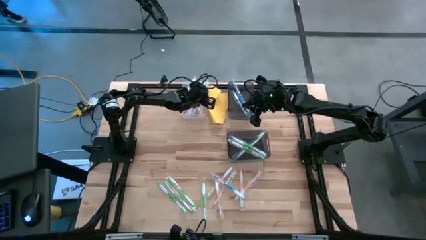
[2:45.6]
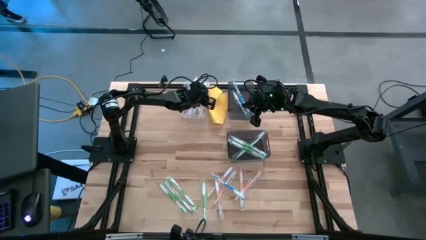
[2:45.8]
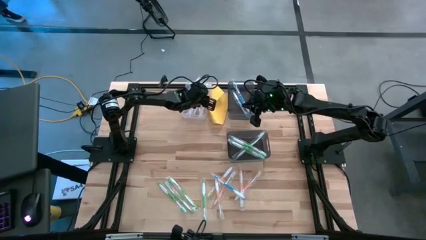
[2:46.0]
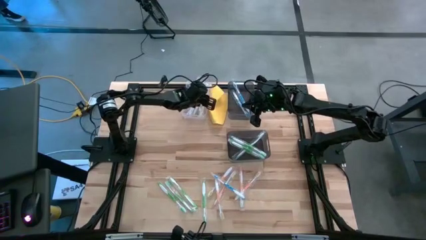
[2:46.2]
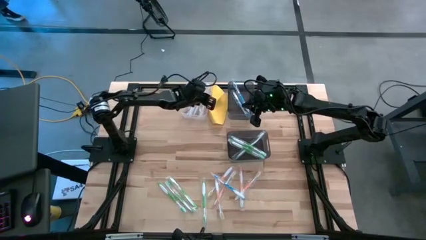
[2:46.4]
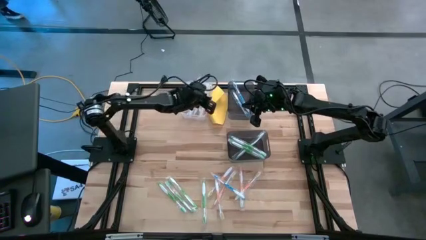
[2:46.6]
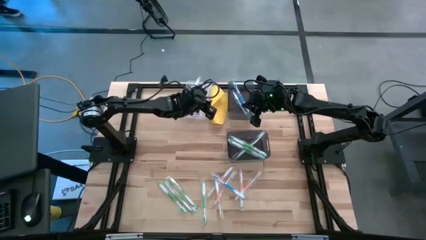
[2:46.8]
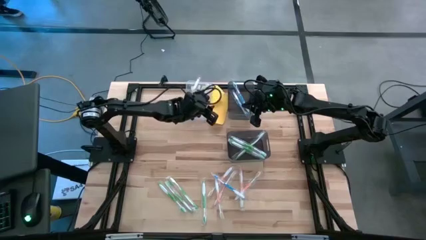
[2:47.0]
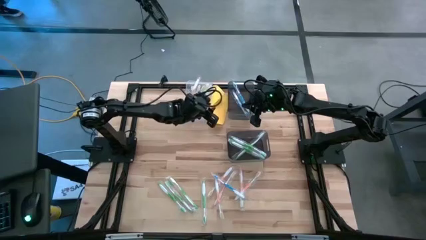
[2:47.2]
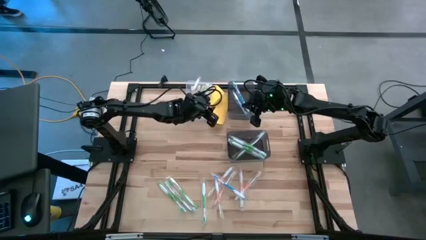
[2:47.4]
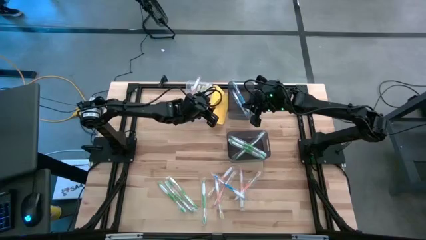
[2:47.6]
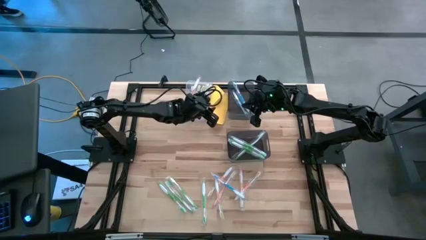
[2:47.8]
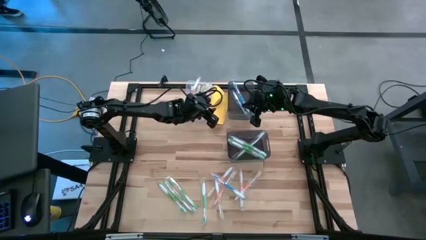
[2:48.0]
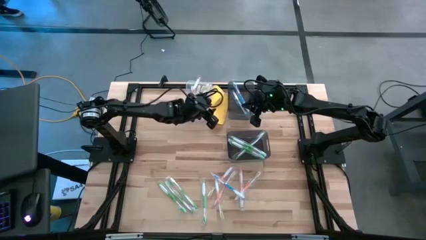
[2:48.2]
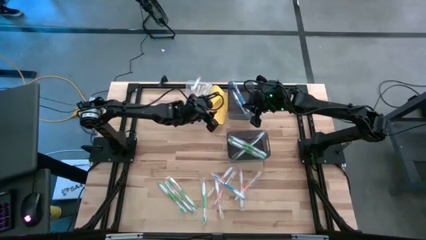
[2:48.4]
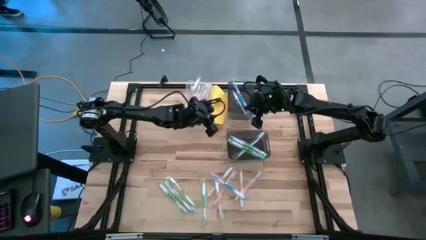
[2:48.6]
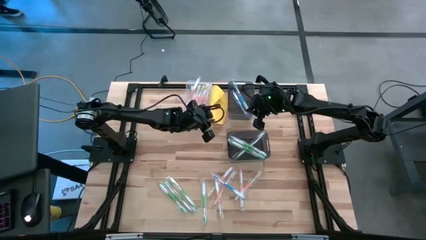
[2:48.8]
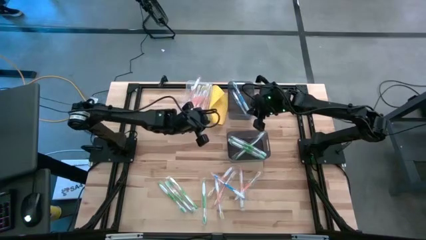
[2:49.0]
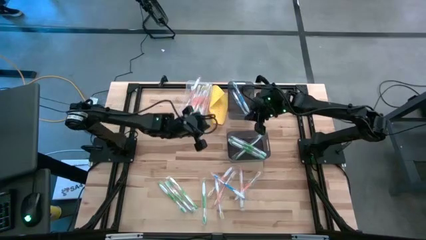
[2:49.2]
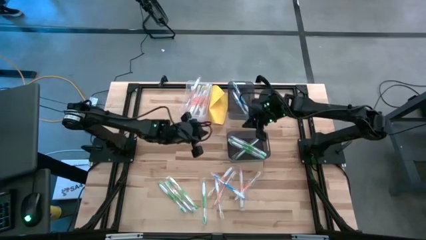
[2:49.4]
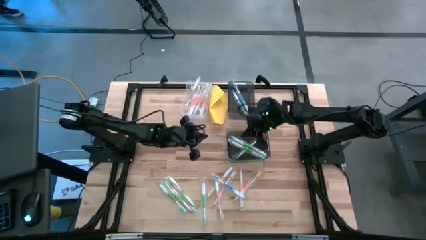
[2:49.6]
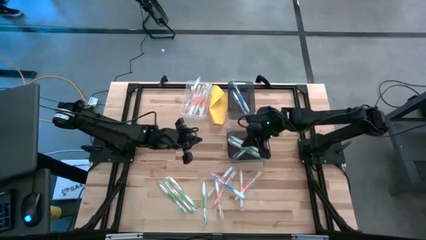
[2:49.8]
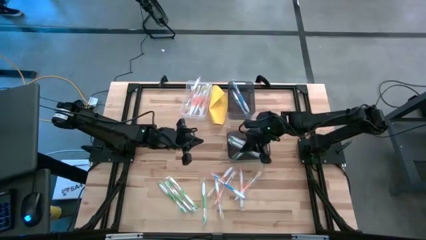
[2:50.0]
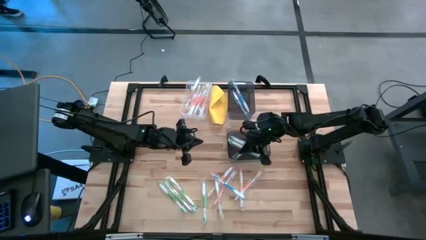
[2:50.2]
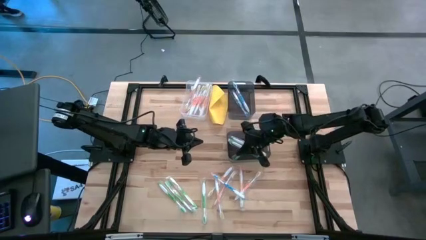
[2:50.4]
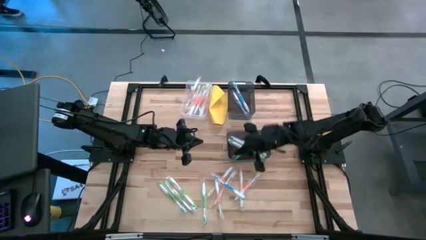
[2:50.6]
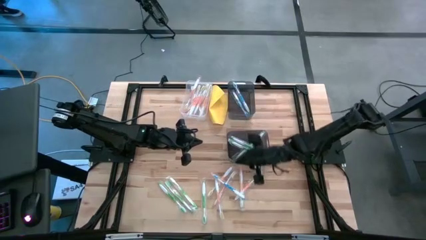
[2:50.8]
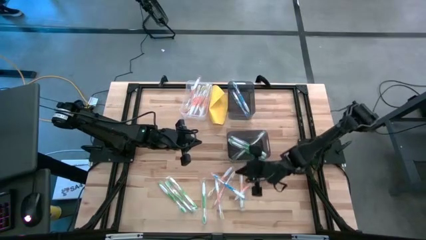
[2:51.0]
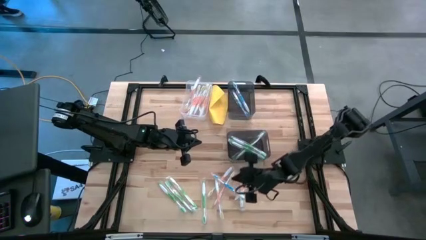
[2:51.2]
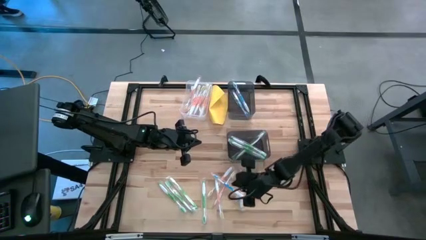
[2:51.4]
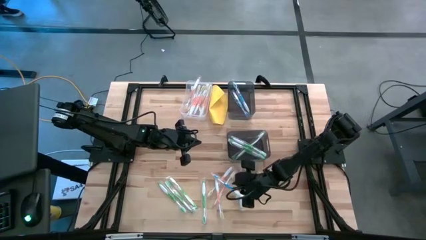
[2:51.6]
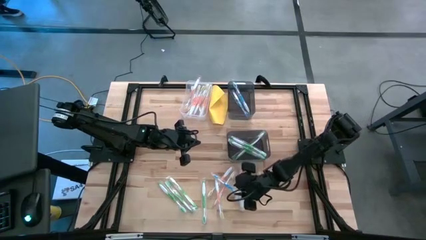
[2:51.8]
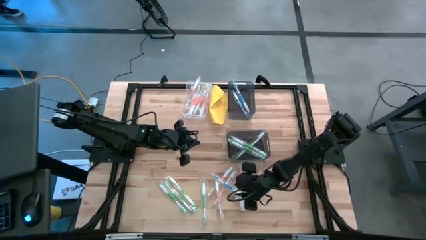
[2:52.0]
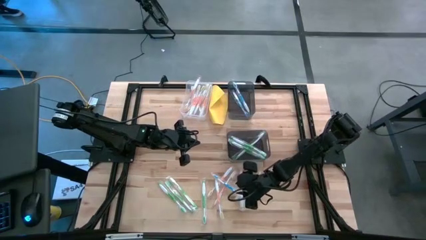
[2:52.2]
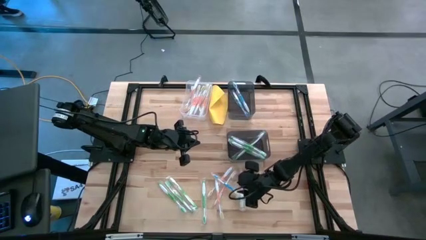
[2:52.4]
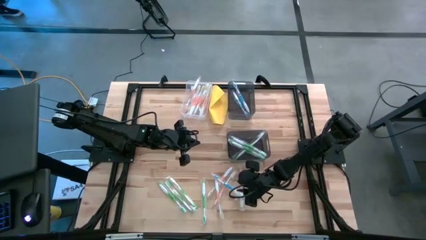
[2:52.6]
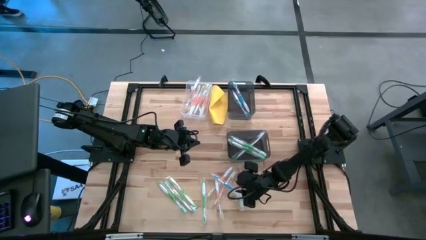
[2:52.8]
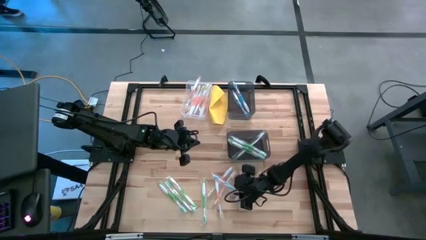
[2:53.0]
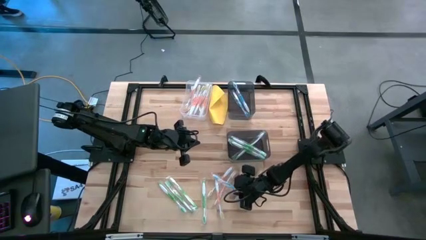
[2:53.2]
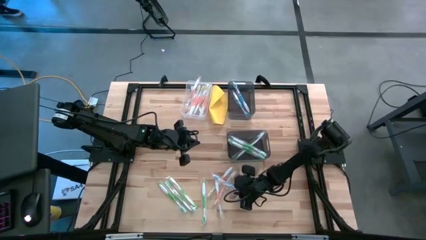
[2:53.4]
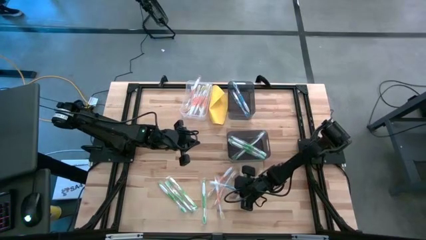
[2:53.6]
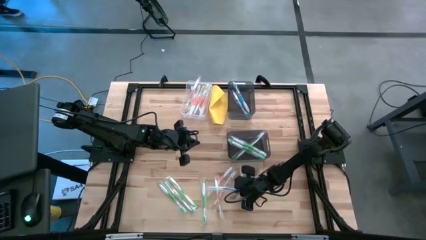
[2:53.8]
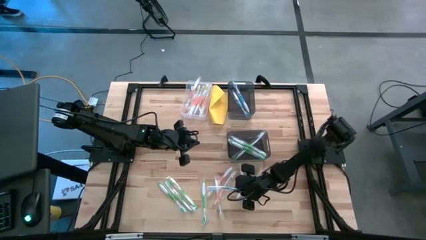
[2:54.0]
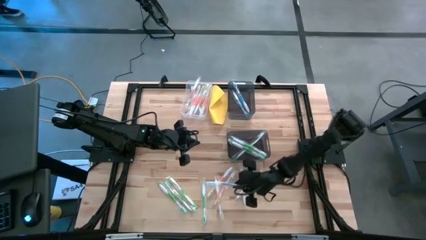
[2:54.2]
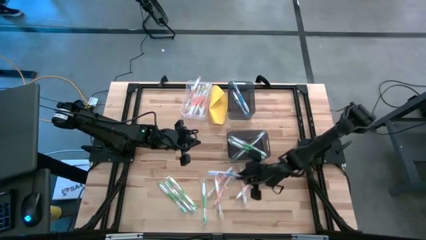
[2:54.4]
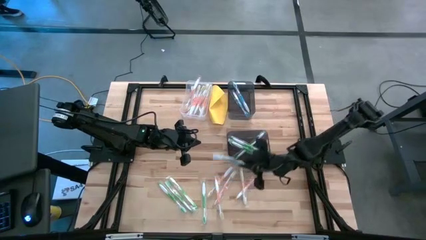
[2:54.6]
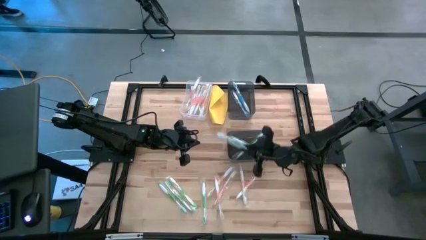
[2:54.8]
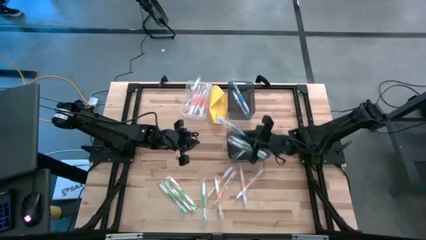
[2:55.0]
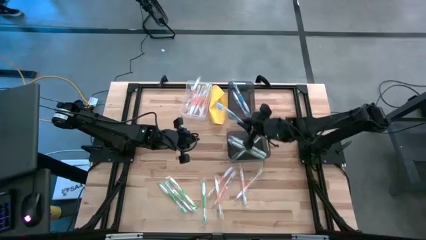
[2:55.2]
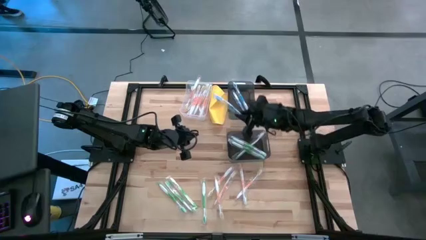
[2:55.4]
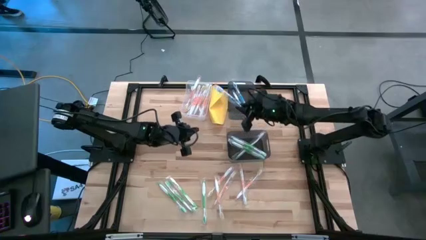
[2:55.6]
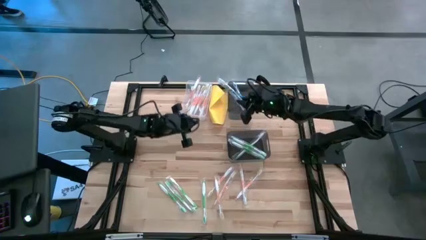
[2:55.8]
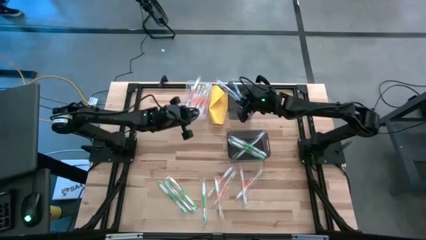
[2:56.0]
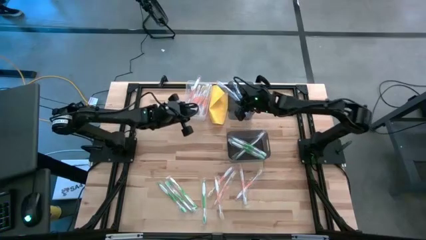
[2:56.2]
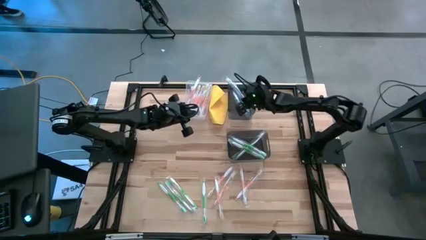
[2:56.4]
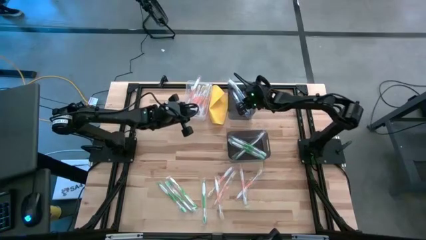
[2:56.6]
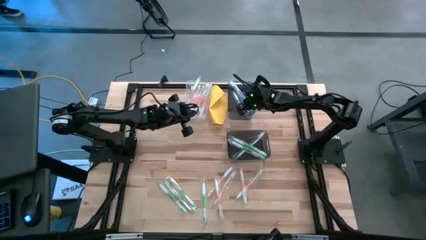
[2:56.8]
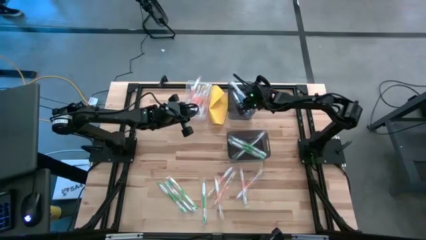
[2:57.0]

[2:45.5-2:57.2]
Task: Pick & Place Toothbrushes
Put the blue toothbrush into the top black transparent bin

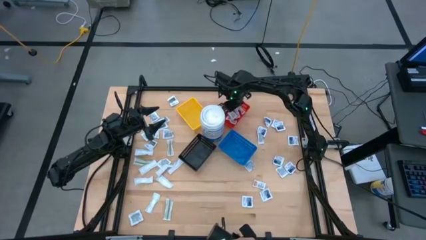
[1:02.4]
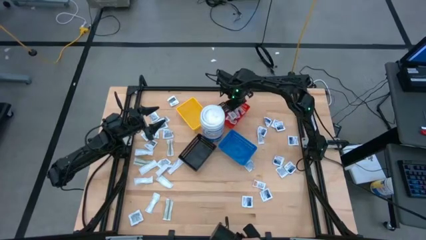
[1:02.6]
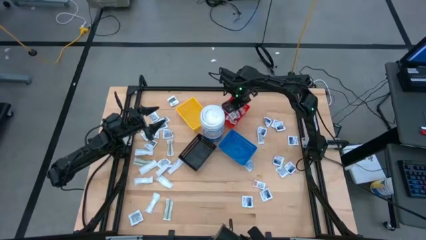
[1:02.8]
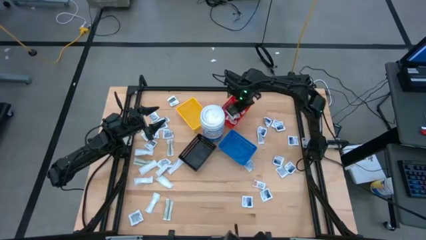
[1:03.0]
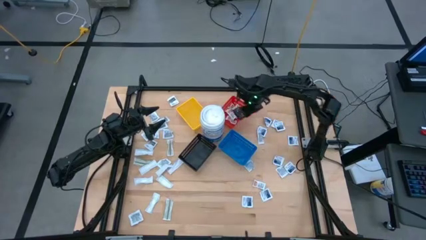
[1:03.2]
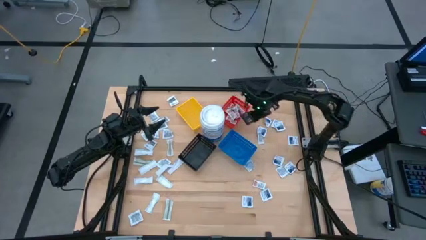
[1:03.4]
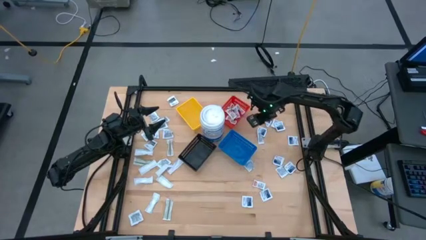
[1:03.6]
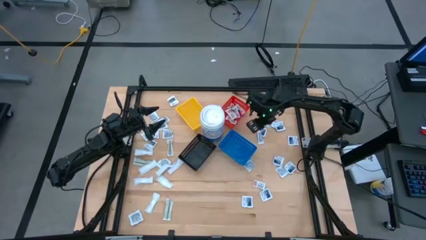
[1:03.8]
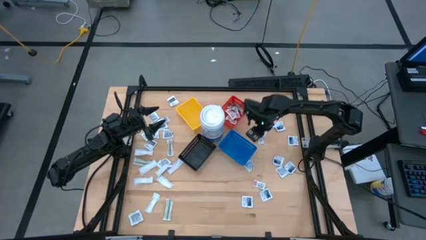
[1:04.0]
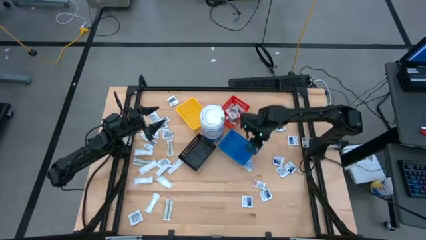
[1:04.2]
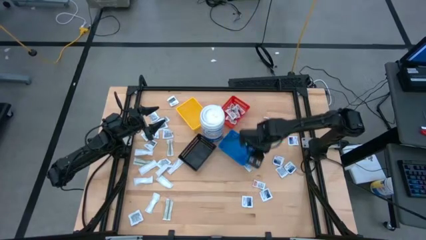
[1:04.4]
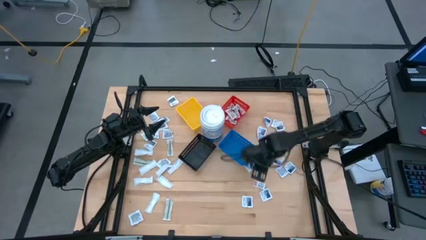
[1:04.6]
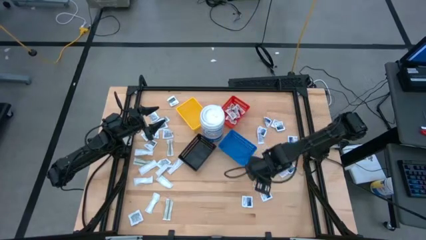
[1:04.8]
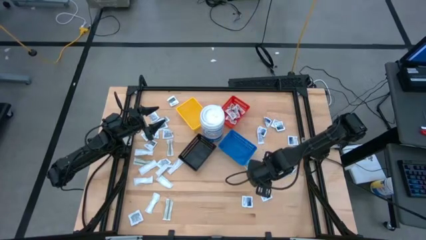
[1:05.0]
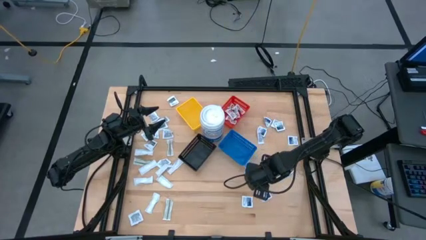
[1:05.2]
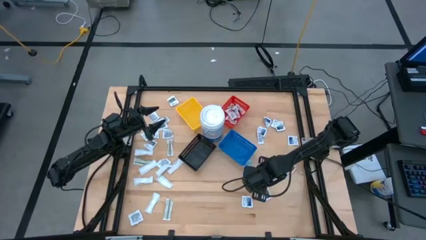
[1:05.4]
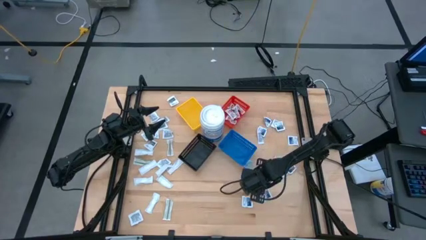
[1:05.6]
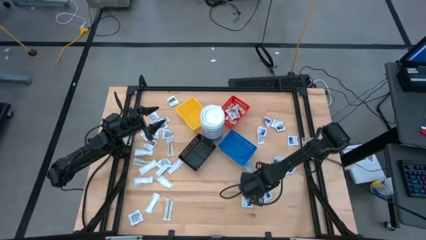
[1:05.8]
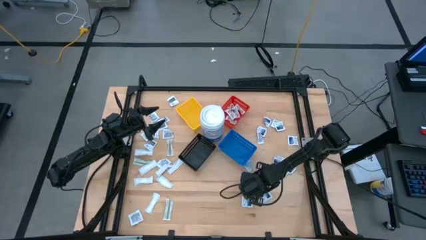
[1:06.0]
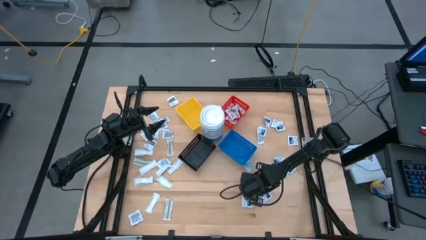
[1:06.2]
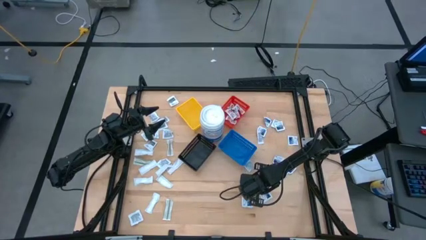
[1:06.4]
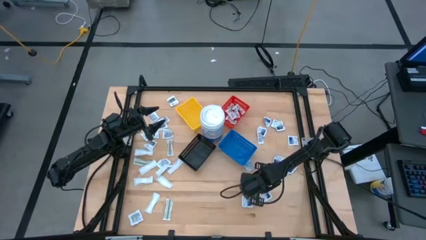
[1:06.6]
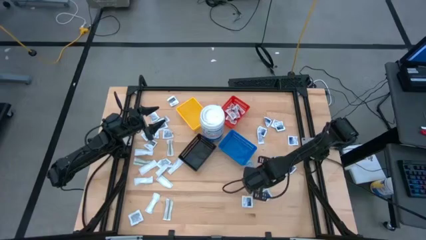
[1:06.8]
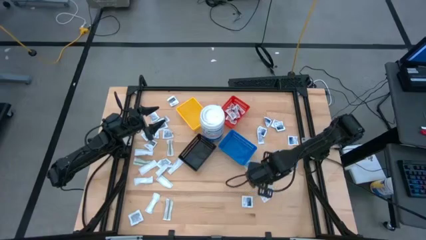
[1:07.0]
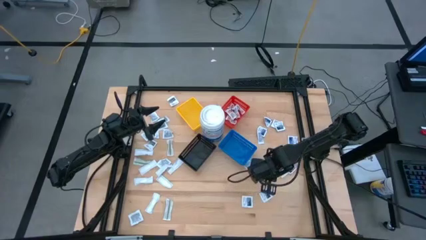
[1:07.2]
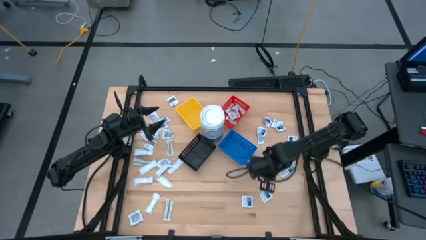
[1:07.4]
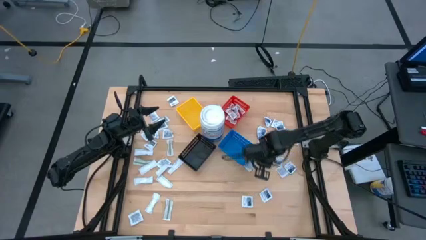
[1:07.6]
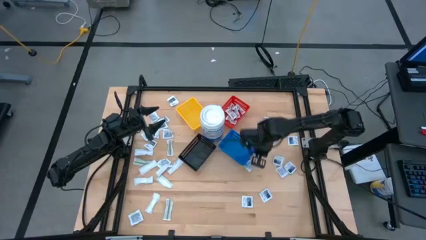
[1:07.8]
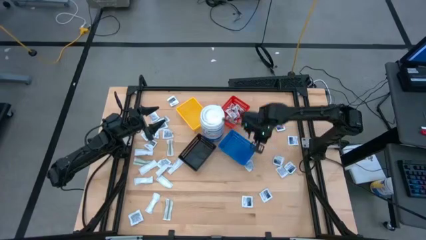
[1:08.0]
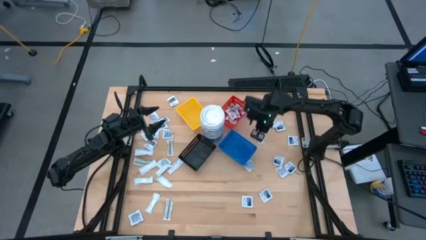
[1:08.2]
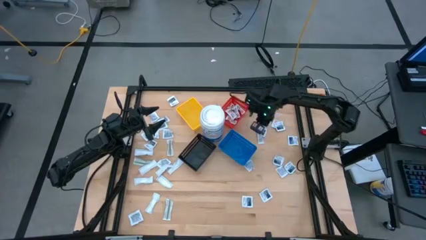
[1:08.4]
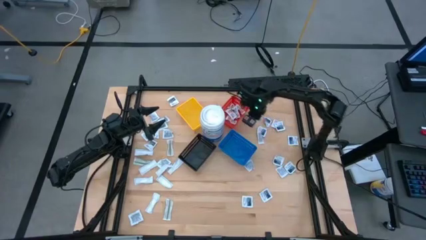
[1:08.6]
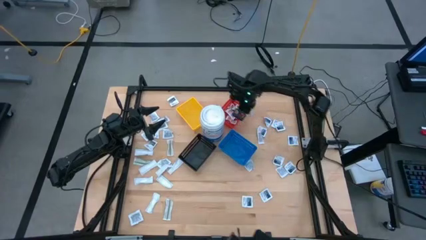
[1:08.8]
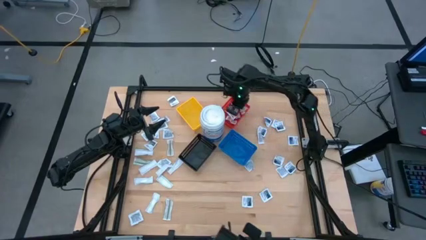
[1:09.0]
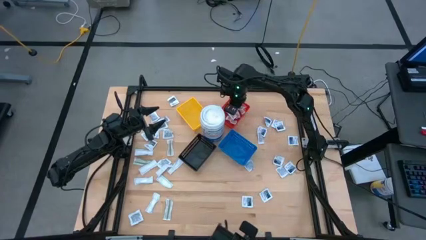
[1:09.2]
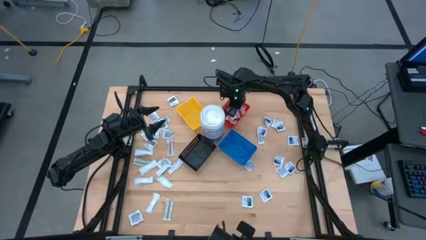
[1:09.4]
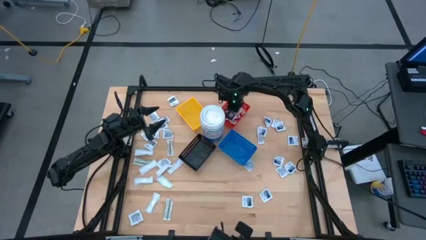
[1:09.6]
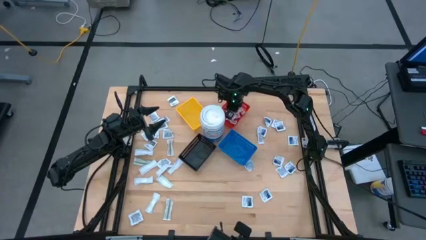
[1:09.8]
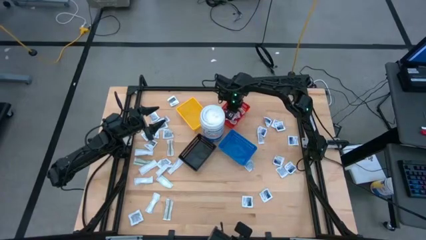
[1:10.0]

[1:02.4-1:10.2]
Task: Pick & Place First Aid Supplies
Put the ointment pack into the red bin
